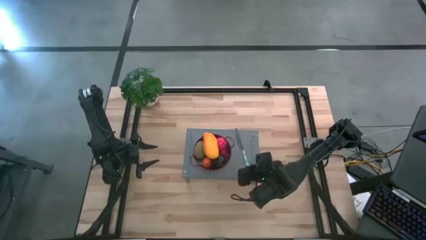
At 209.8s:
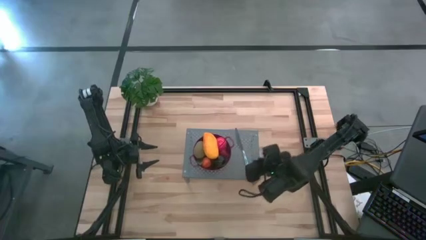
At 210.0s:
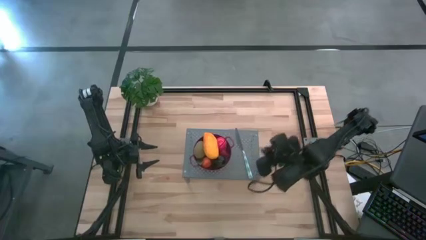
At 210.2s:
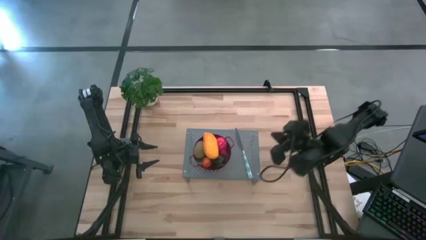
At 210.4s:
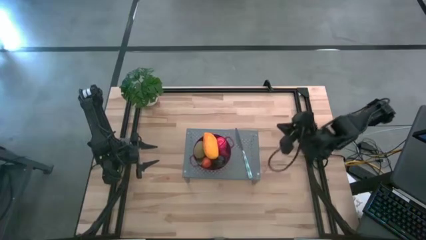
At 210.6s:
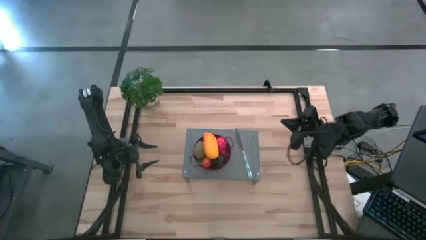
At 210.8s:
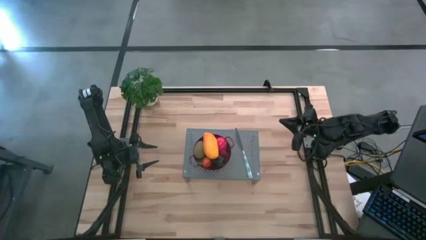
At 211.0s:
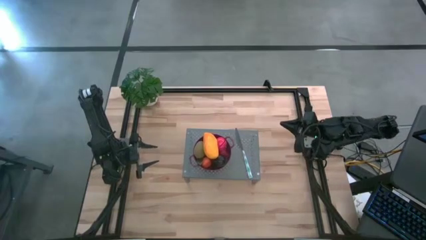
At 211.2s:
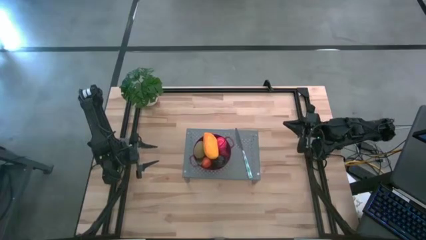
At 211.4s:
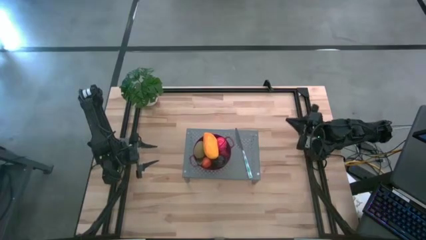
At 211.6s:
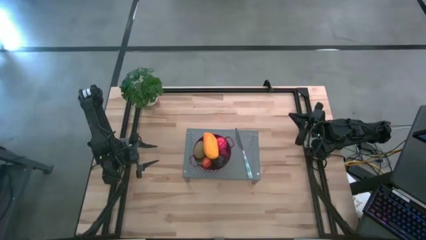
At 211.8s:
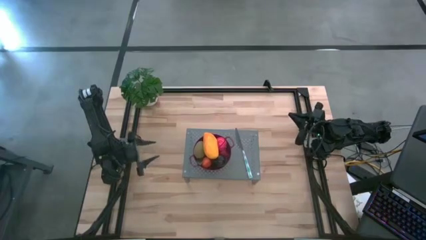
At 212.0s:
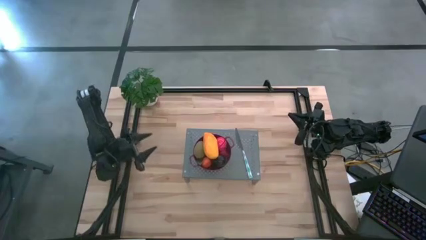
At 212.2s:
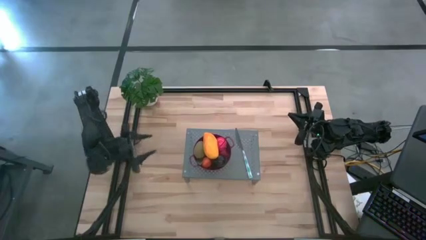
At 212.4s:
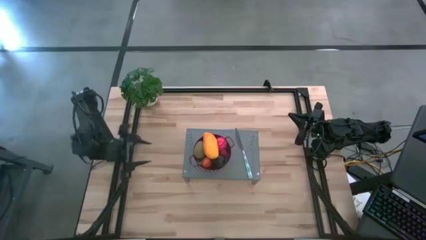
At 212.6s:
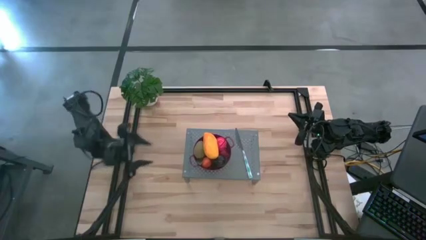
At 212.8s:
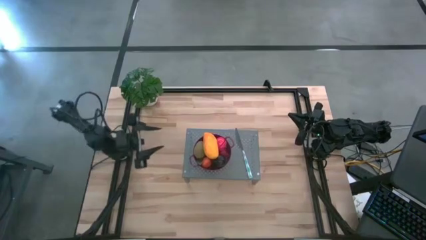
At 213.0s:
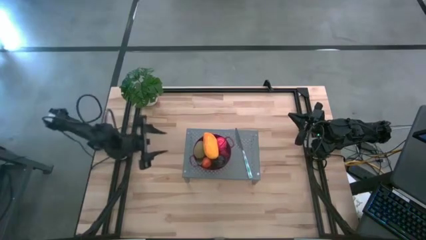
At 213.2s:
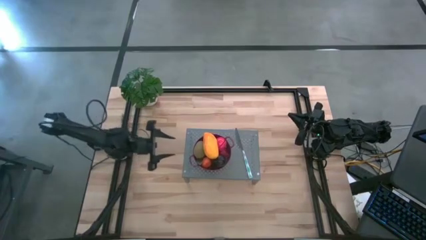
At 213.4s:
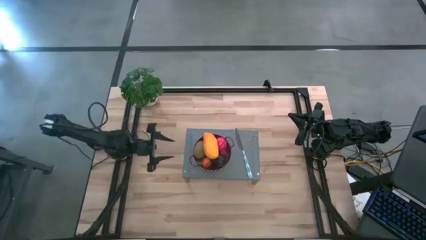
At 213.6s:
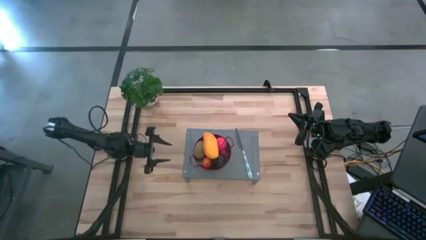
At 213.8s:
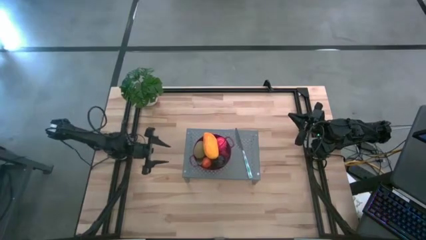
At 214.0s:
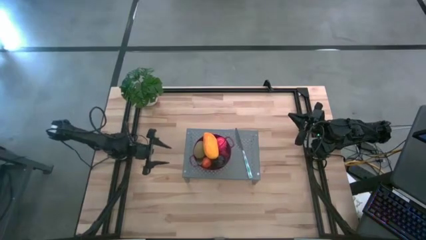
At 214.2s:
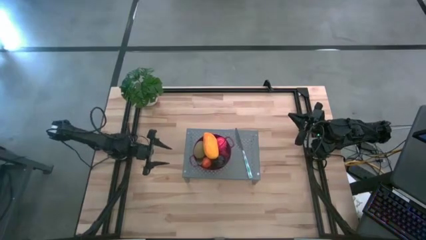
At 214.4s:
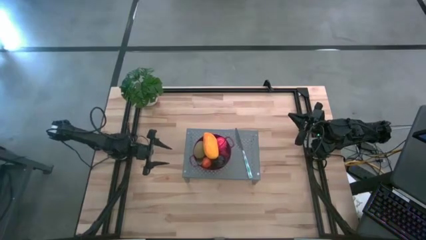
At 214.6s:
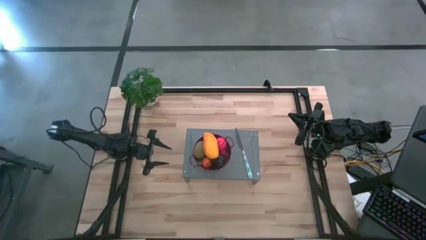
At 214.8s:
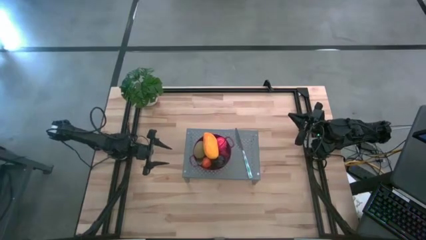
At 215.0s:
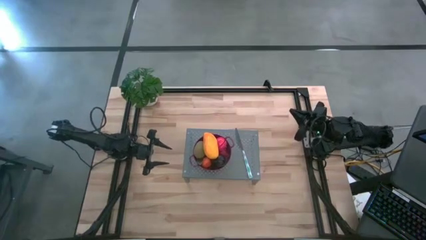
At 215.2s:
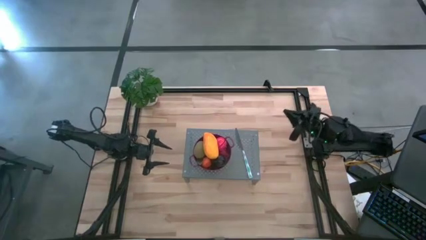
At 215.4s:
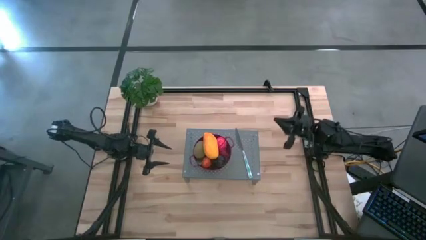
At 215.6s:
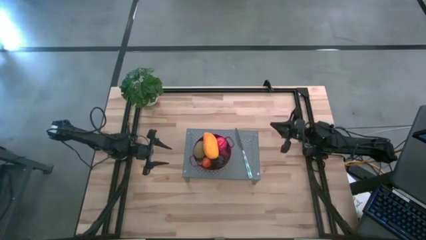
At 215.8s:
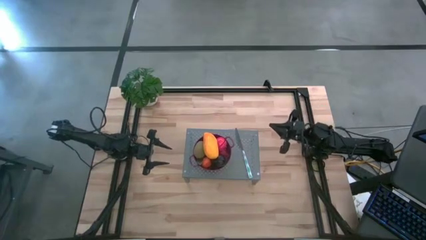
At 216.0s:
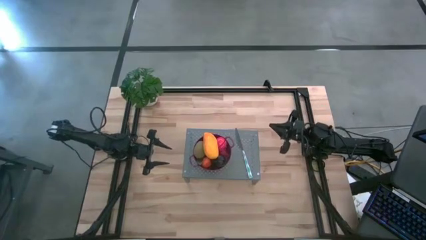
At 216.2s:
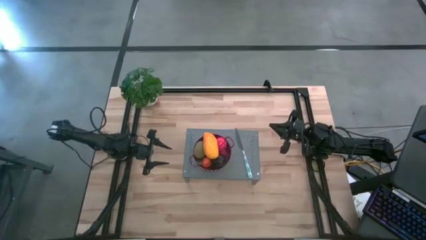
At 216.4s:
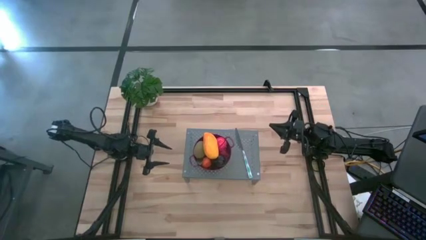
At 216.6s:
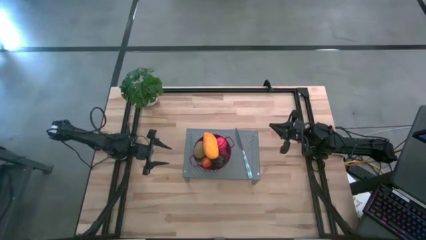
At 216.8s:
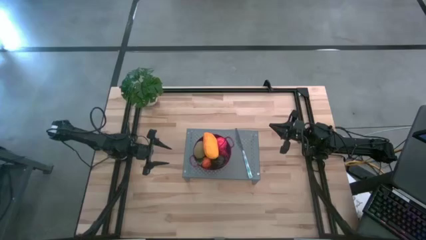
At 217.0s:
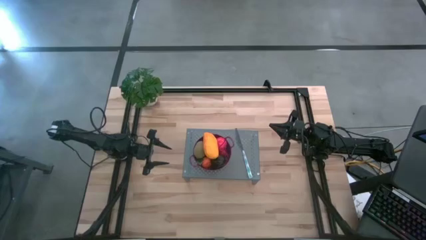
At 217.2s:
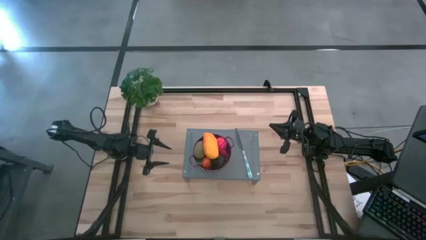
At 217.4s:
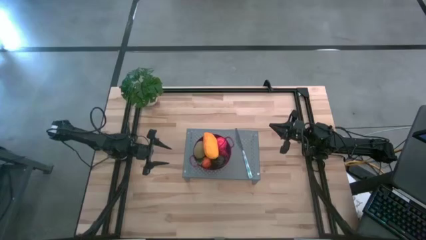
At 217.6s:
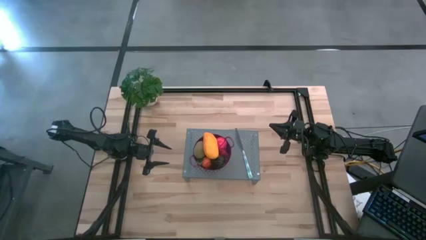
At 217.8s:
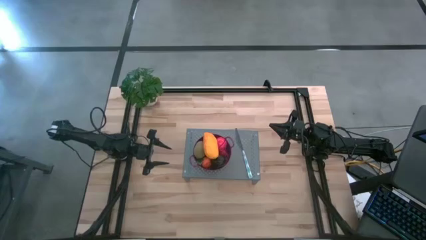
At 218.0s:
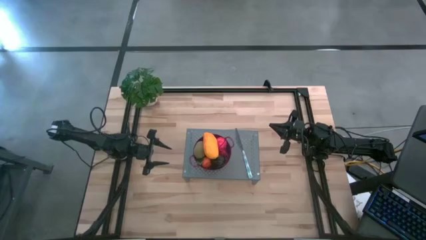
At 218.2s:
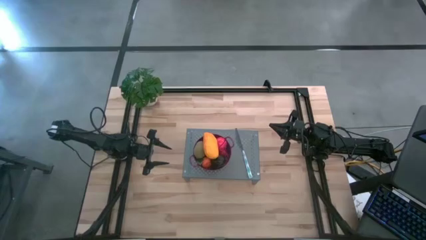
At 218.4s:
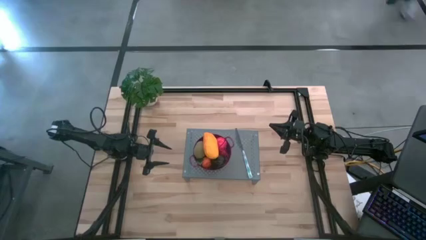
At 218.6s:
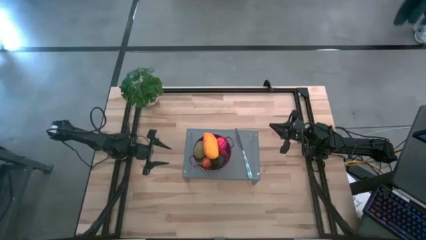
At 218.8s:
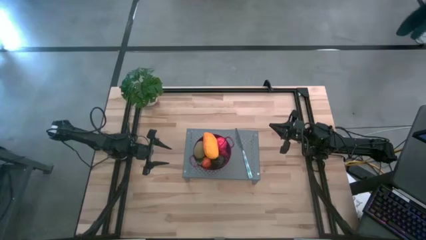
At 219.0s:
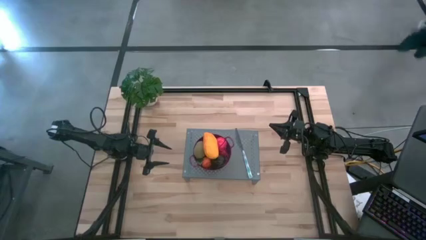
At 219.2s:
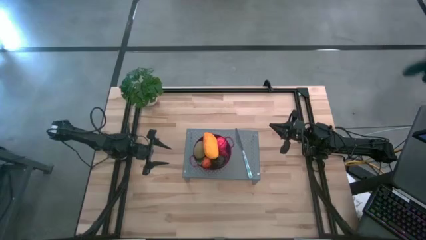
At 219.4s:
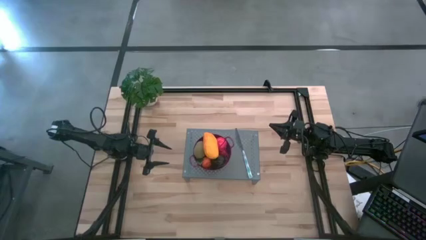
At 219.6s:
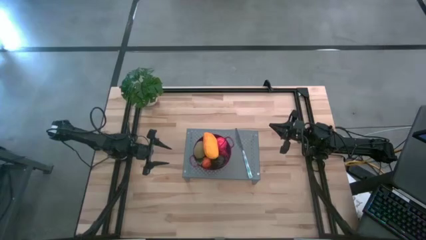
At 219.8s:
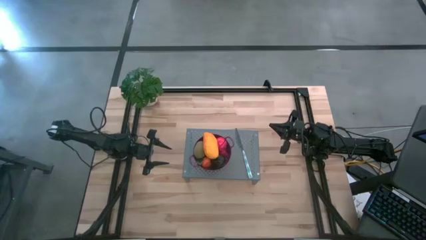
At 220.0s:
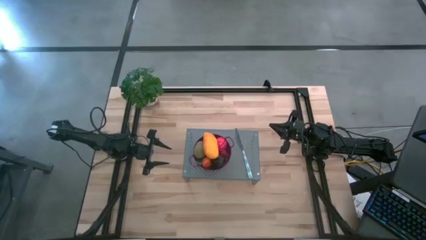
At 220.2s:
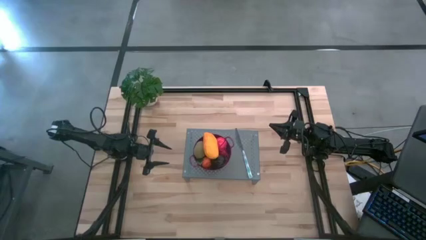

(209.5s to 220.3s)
Task: Pick & Place Fruit
Return to Home Position

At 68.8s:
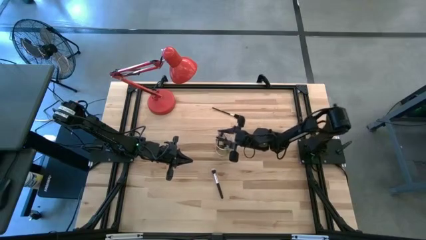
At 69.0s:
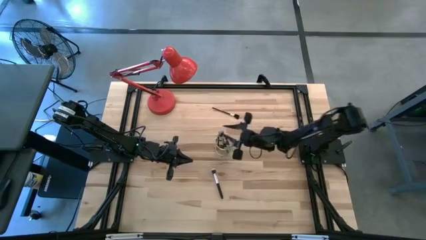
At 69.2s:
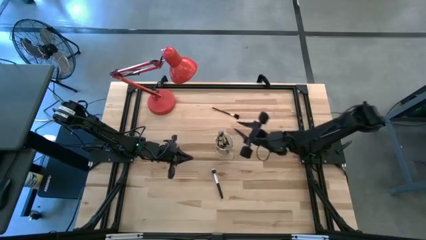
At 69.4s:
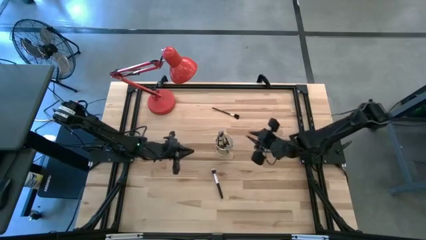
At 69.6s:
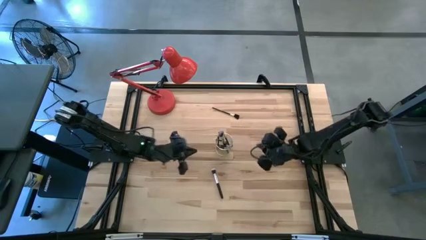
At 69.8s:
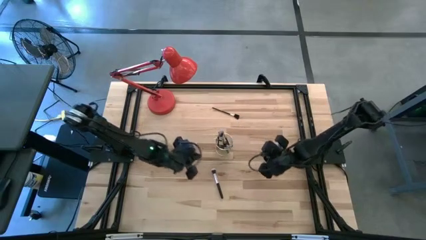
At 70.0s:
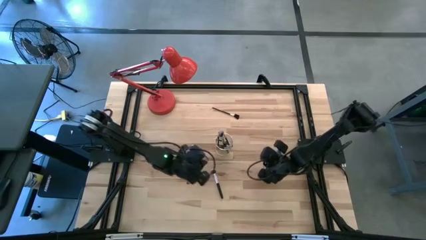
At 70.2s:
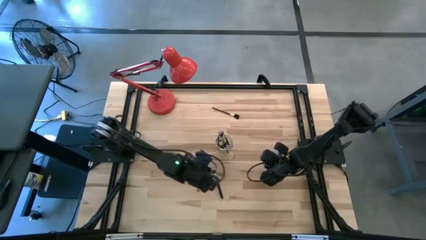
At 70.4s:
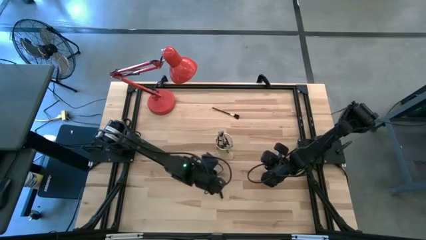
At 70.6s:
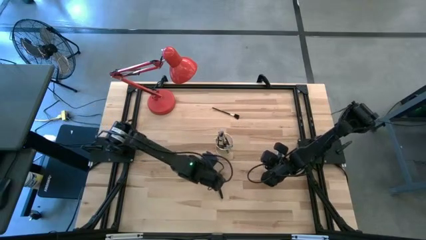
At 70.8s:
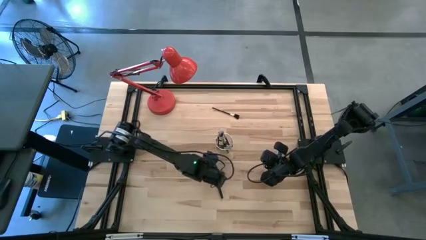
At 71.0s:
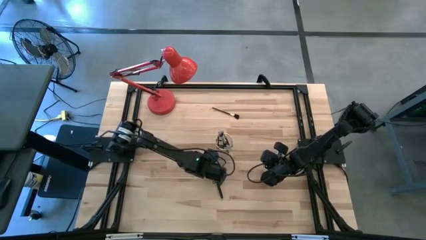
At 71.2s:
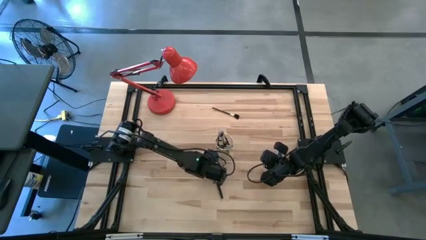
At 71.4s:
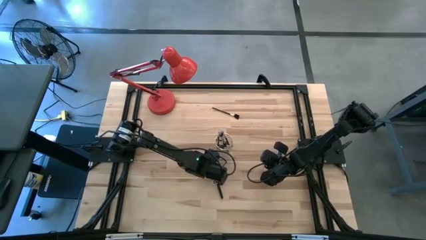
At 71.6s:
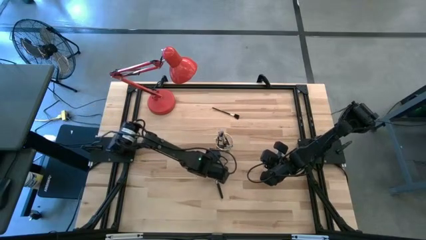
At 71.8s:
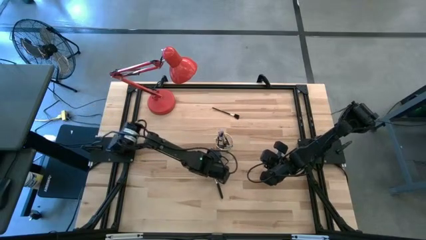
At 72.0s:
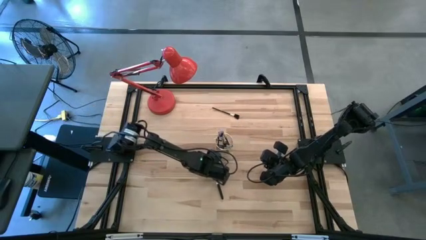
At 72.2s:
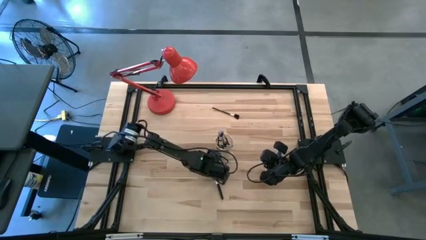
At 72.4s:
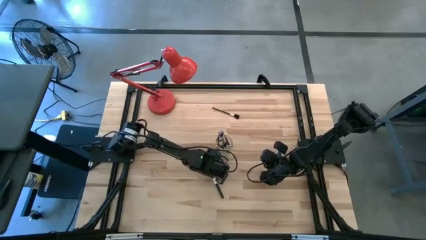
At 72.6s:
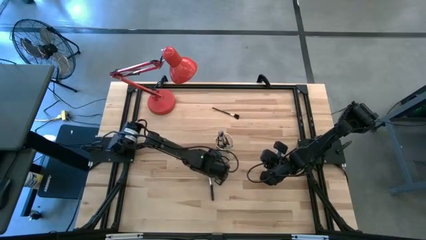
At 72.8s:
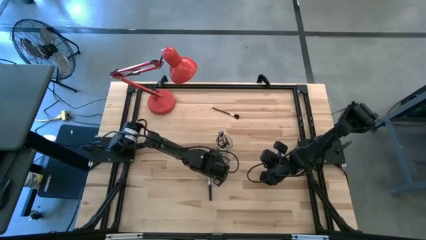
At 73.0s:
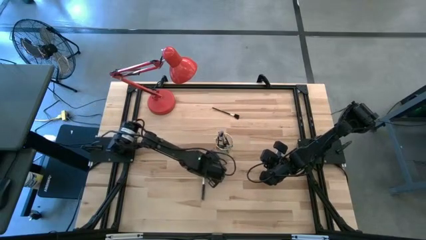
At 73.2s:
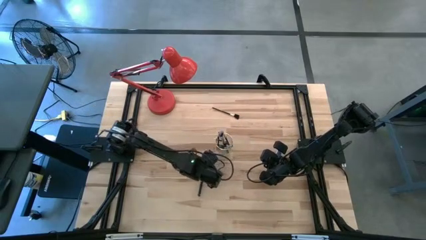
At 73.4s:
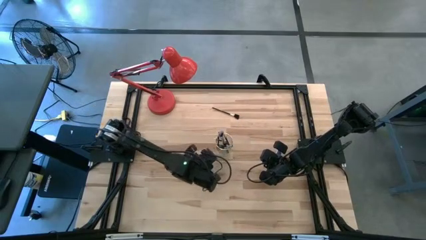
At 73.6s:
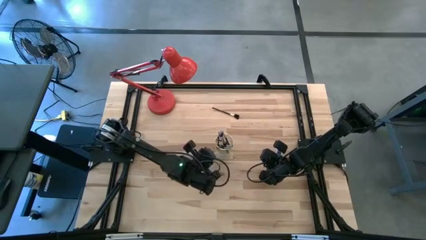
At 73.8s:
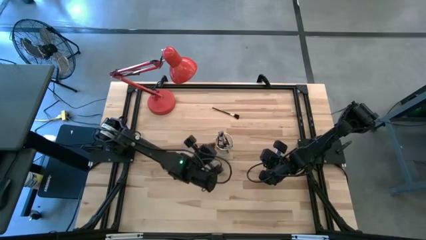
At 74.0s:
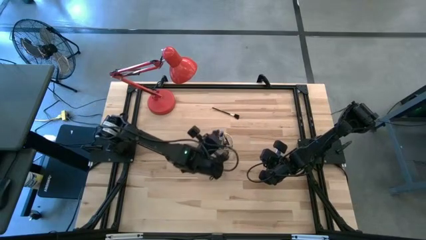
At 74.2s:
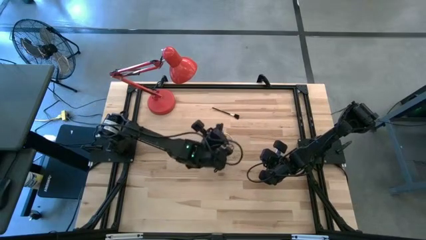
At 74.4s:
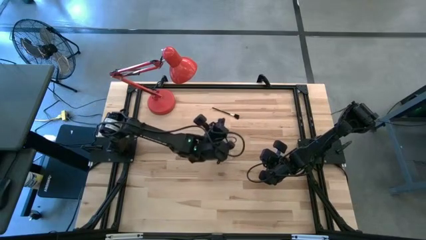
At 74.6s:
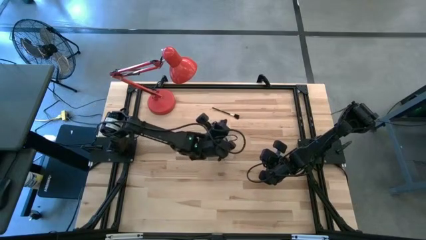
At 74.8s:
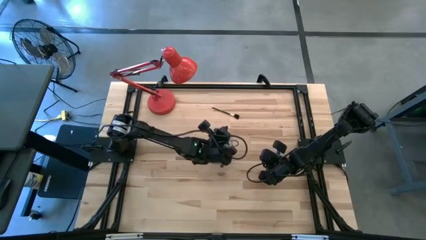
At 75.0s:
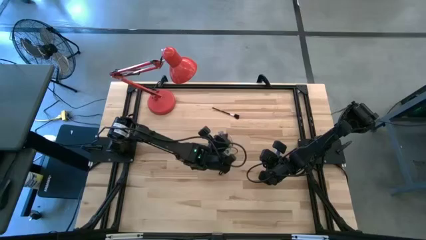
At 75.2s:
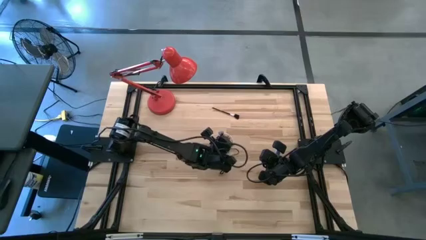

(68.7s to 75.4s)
Task: Put items in baskets/containers
Put the powder brush into the wire organizer
